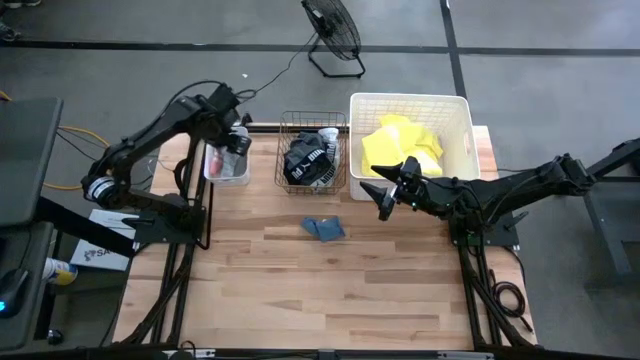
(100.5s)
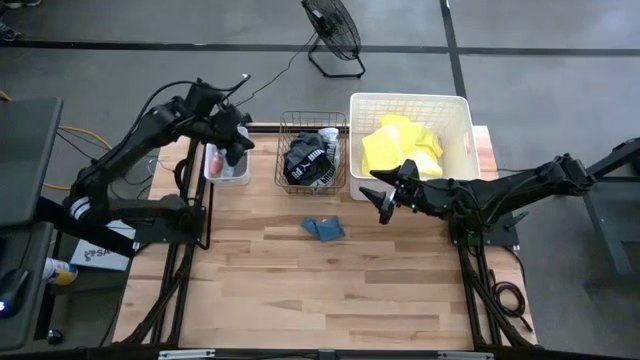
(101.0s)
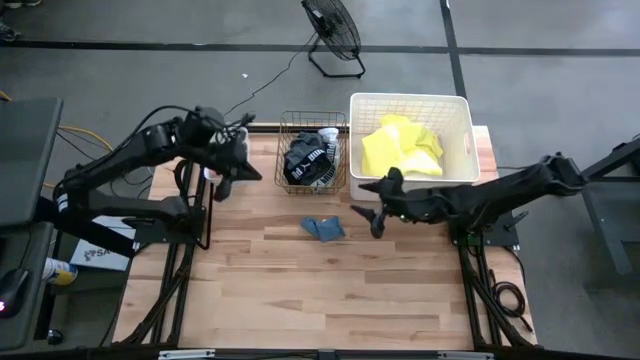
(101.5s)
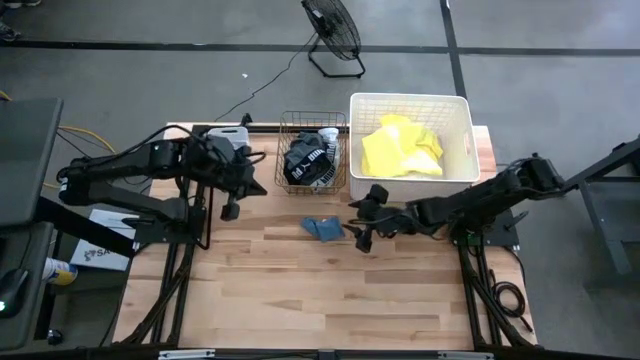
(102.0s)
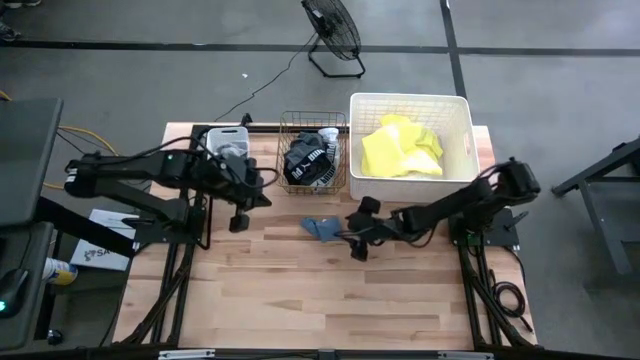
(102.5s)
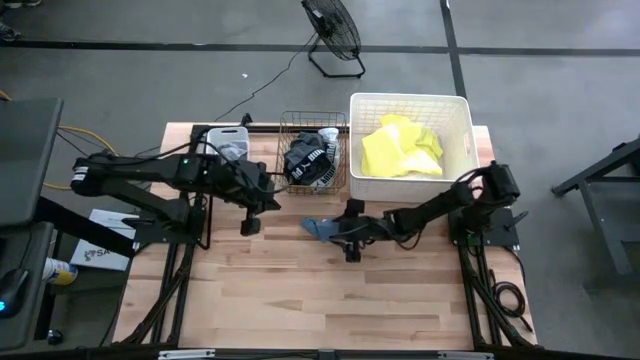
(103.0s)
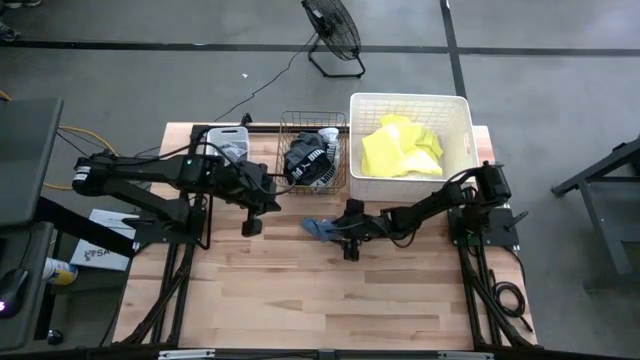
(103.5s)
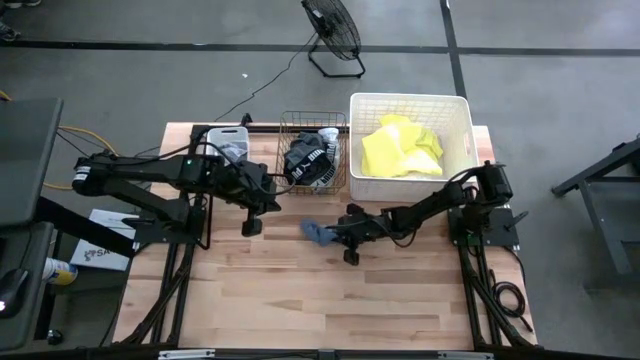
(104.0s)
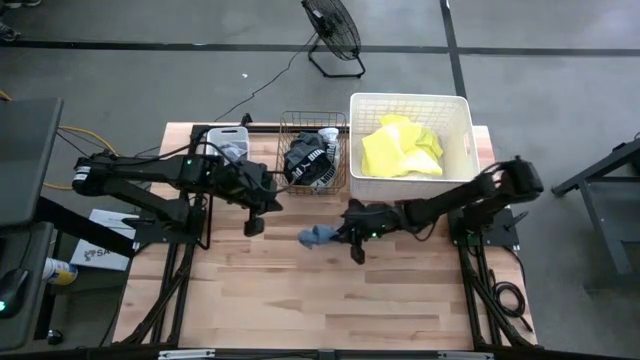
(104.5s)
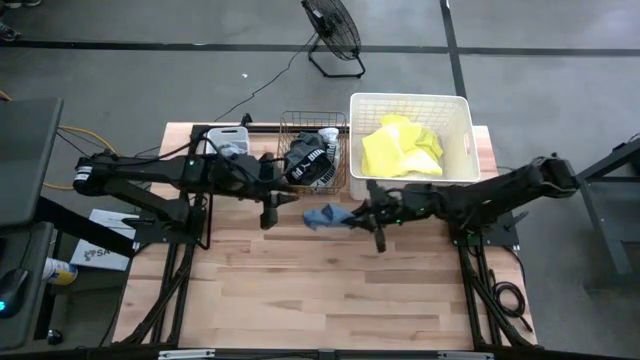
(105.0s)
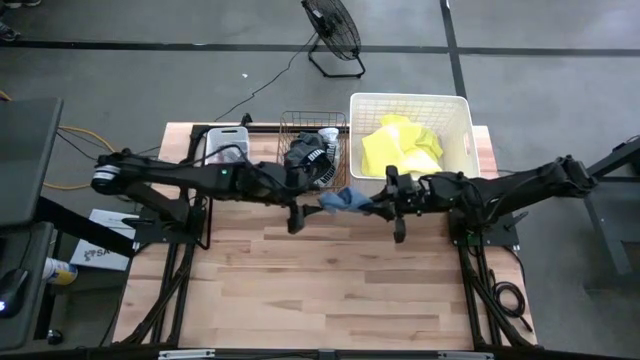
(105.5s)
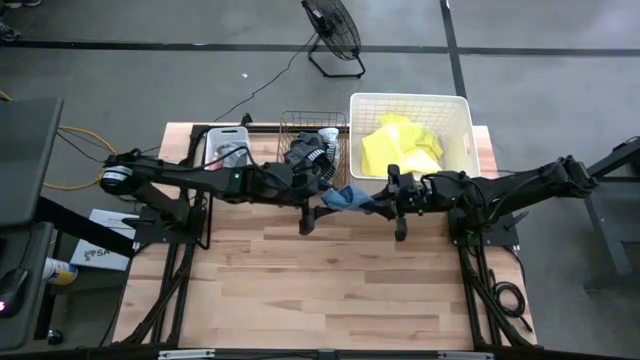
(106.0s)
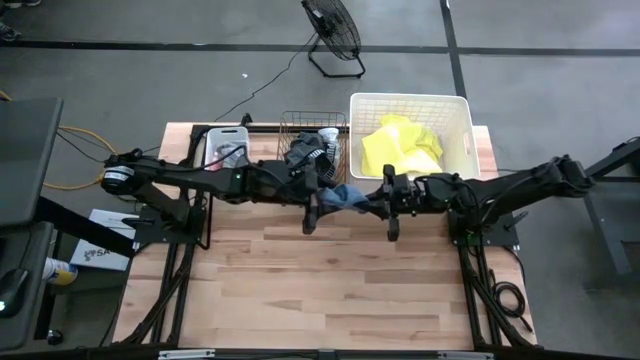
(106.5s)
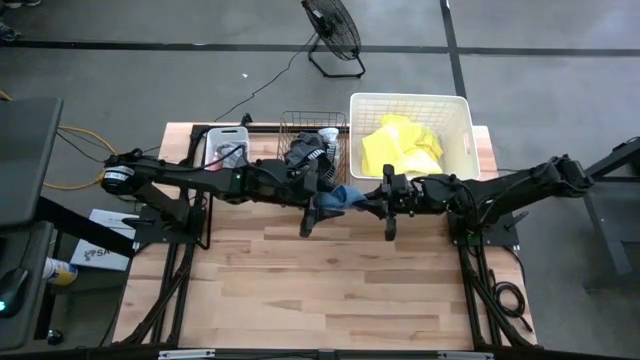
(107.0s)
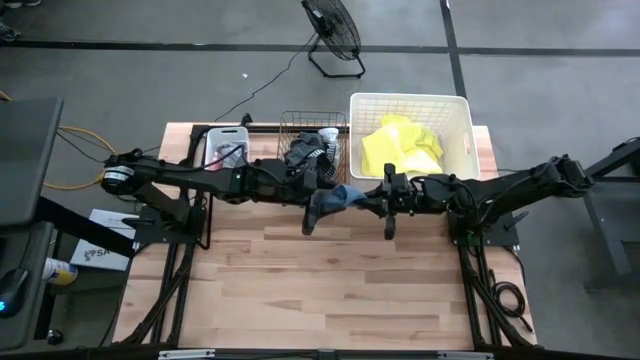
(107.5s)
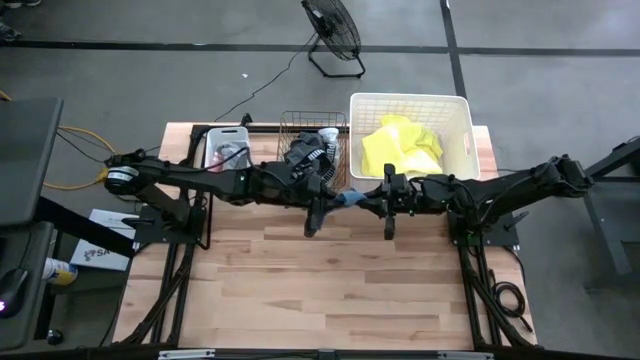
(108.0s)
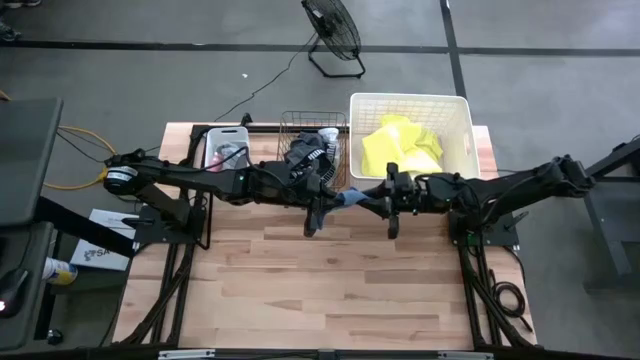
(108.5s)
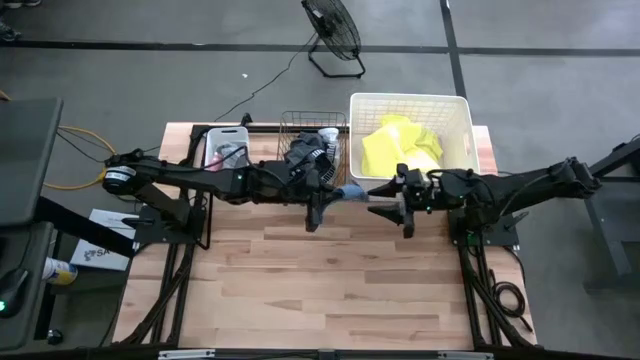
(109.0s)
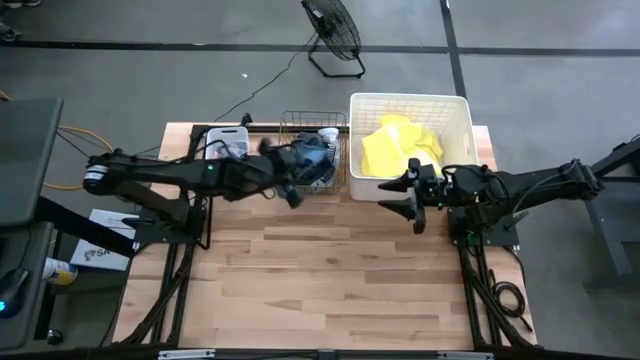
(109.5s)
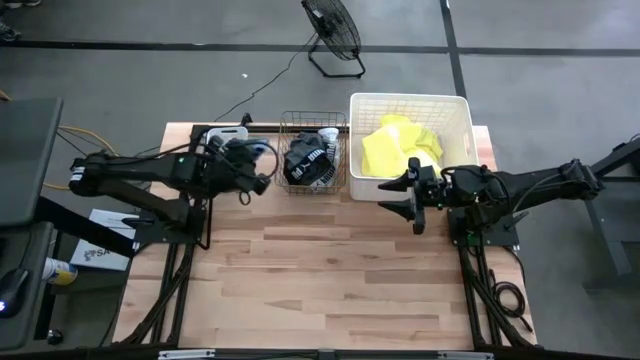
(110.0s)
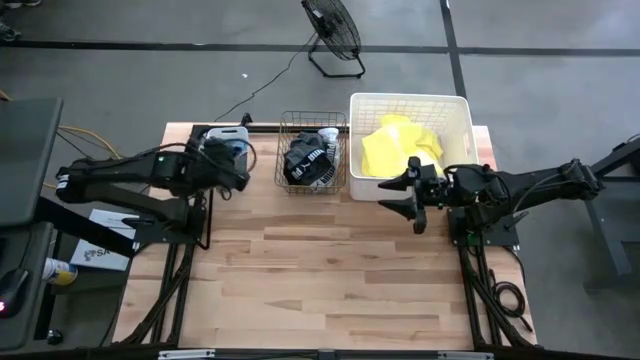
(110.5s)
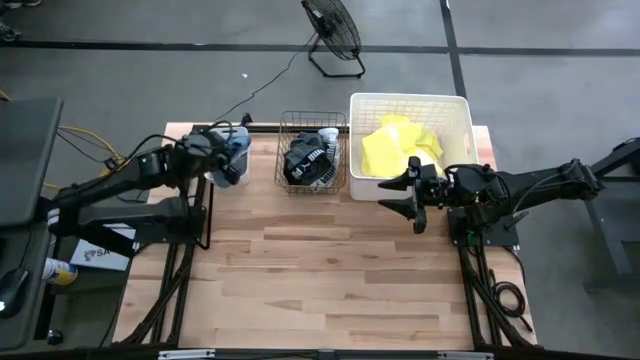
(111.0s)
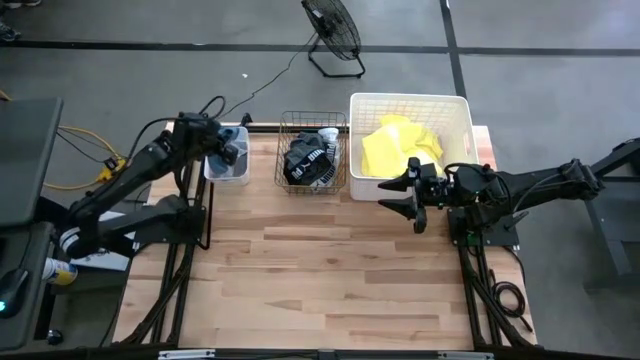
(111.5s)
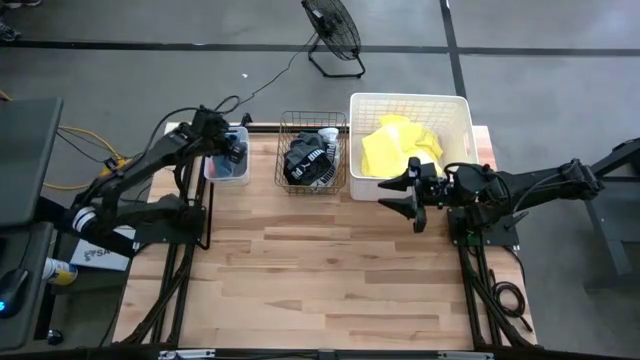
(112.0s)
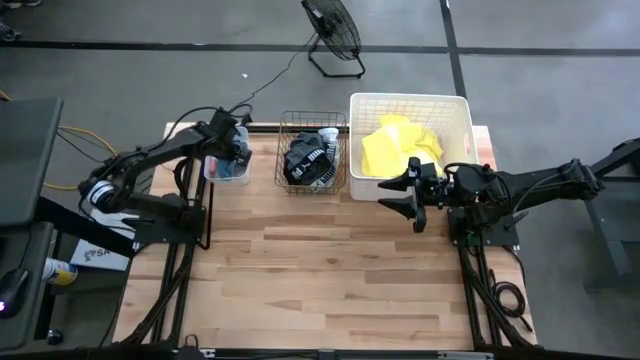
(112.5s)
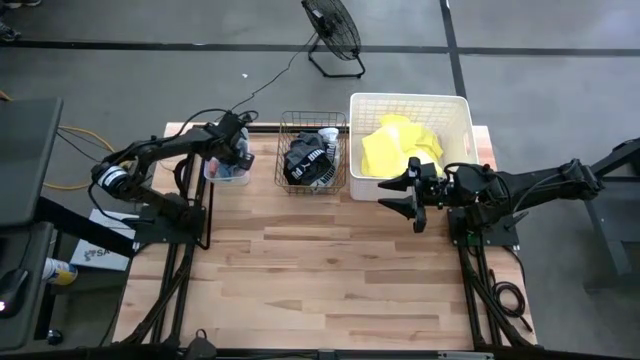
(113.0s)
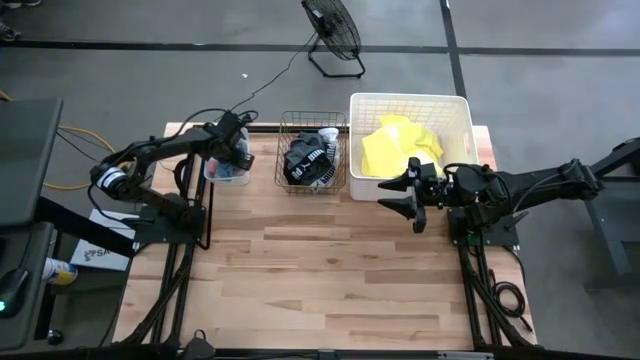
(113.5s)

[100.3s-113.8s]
Task: Pick & Place Cloths
Put the blue sock into the left white bin

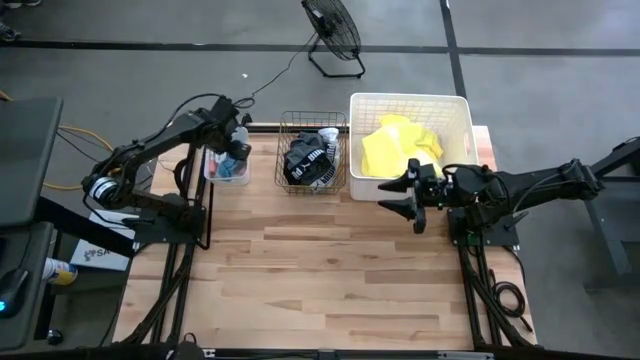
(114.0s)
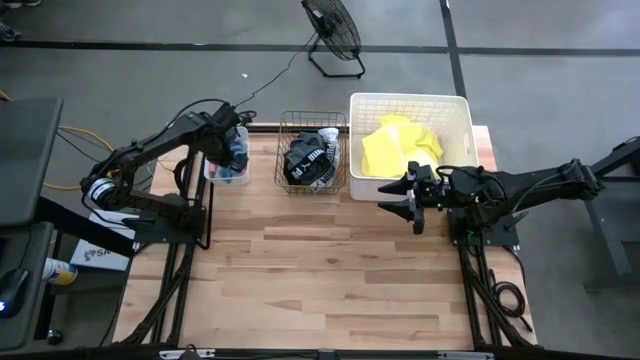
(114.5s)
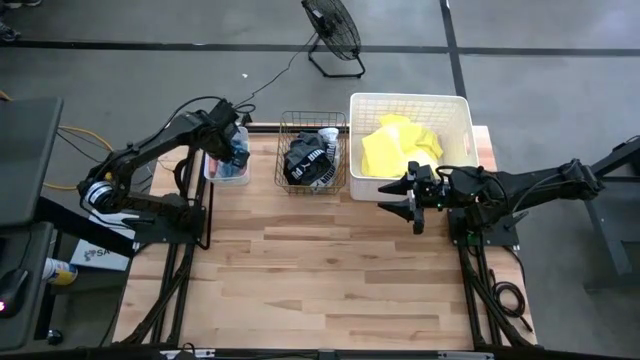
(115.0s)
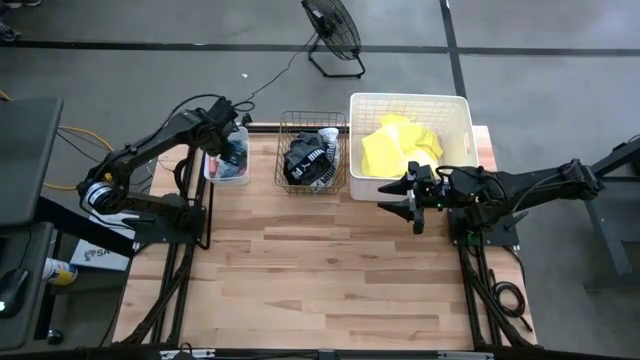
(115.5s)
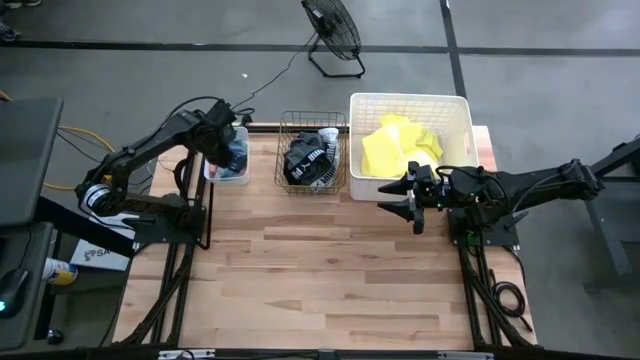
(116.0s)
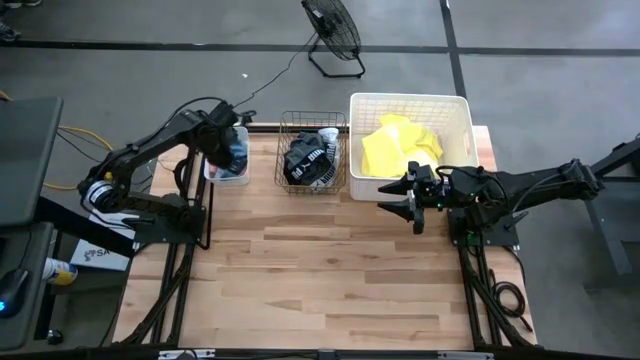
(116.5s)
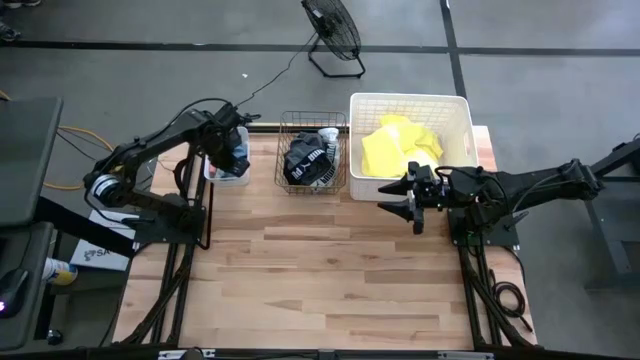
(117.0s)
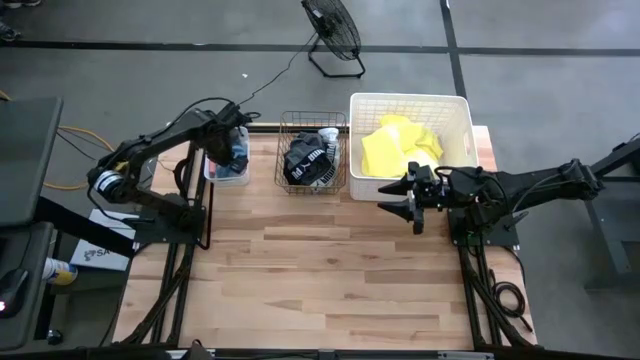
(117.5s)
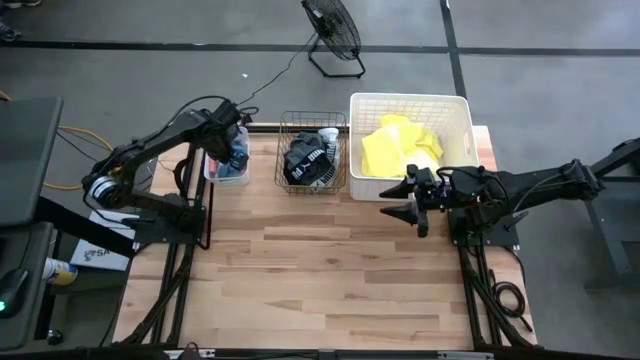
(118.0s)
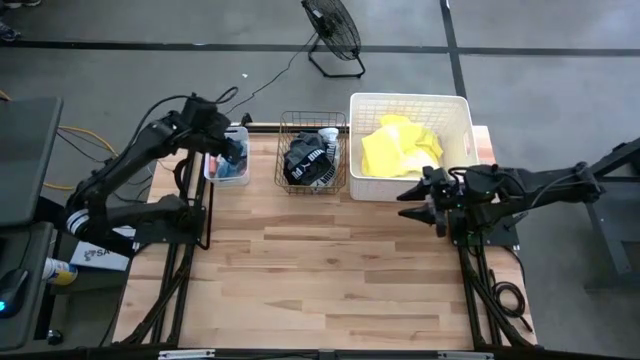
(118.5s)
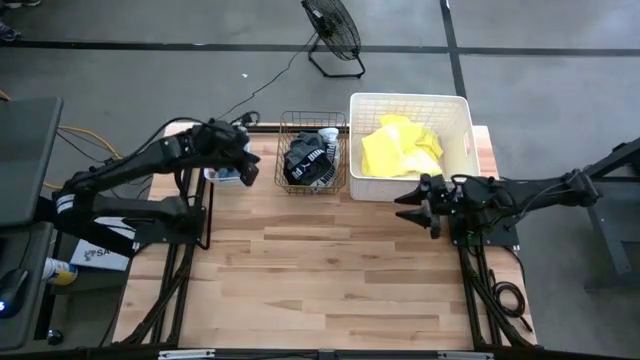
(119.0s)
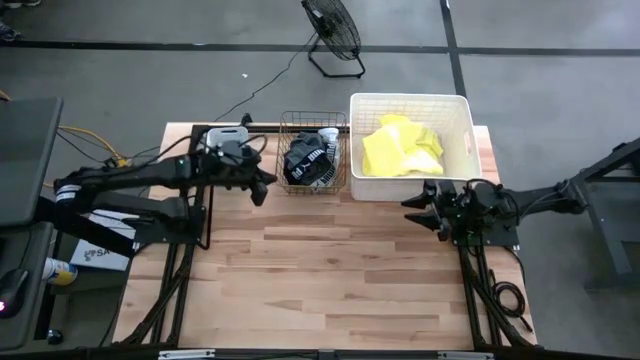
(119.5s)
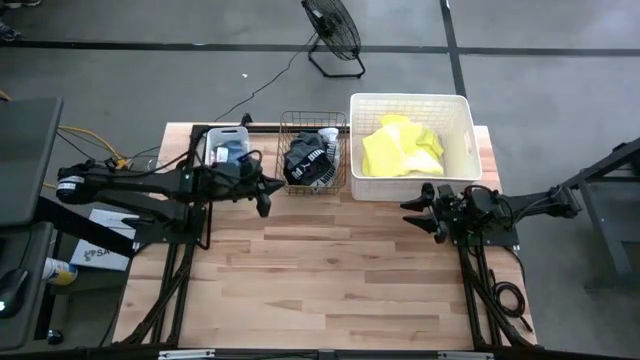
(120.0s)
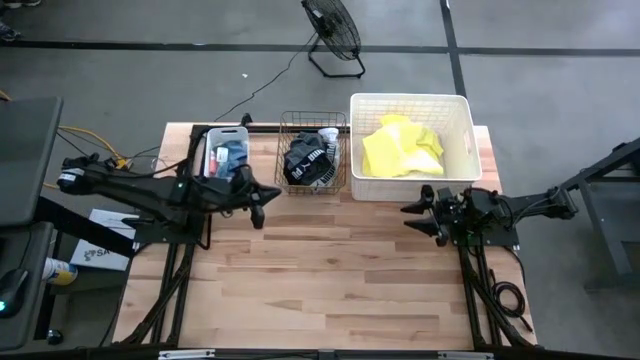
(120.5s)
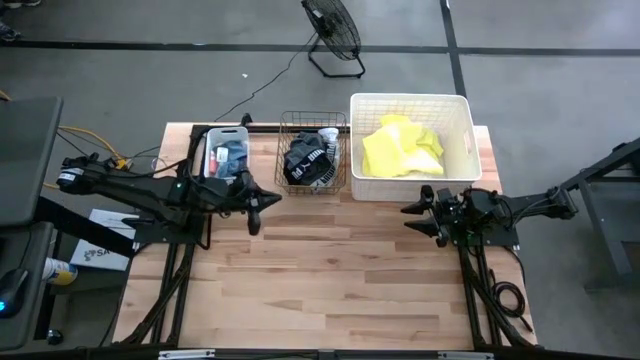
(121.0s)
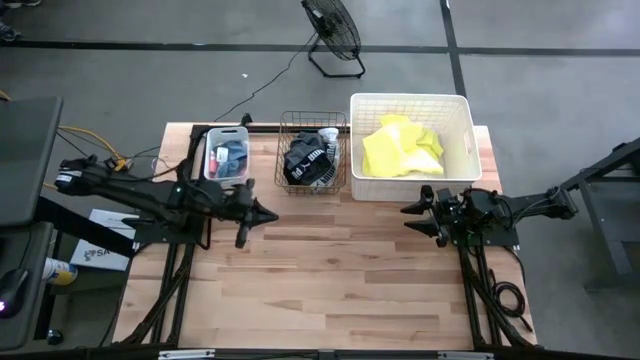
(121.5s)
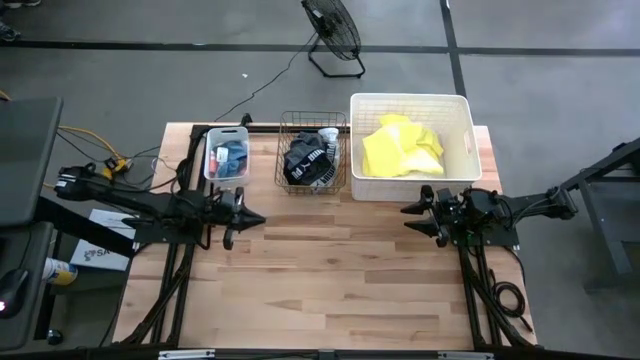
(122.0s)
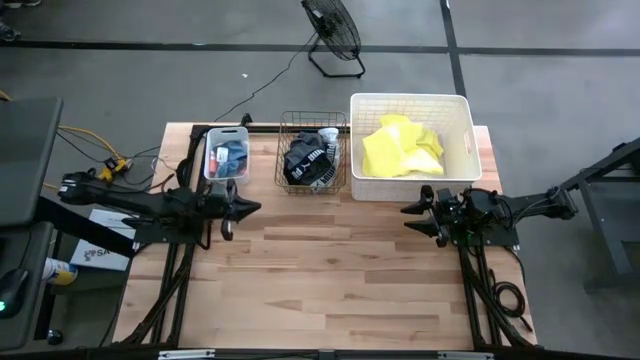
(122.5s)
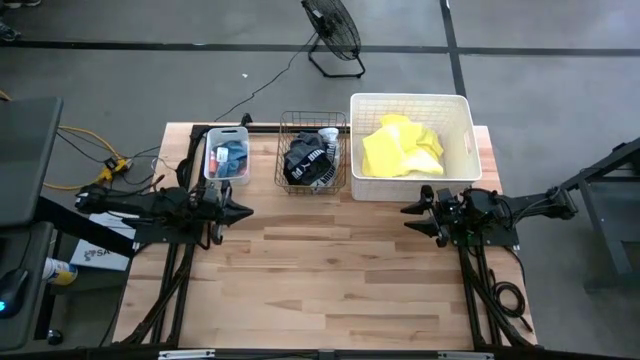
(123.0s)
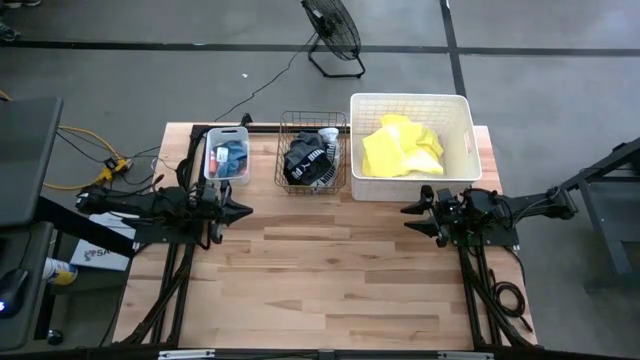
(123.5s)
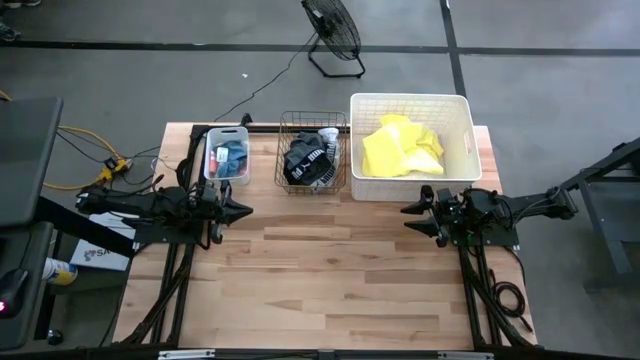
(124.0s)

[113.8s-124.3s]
Return to Home Position
